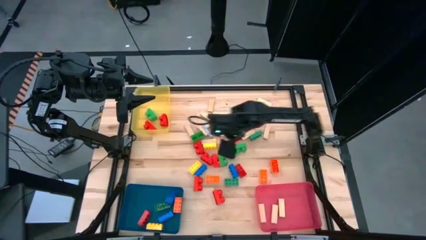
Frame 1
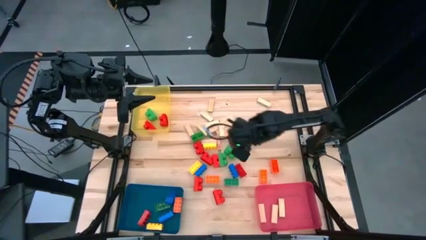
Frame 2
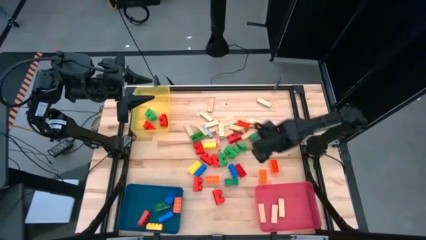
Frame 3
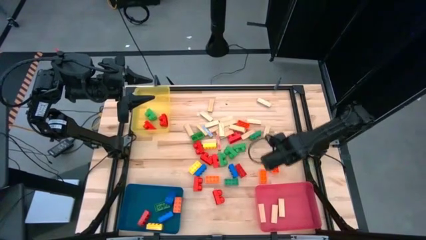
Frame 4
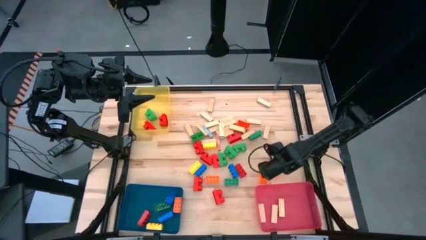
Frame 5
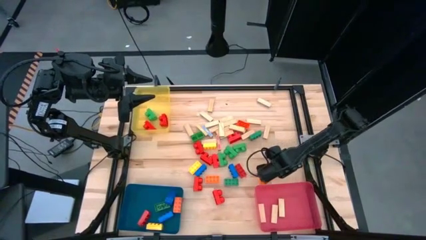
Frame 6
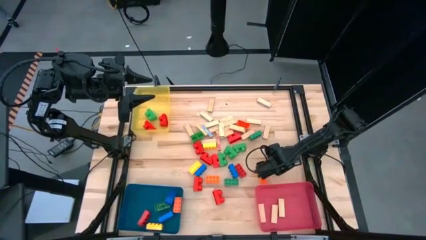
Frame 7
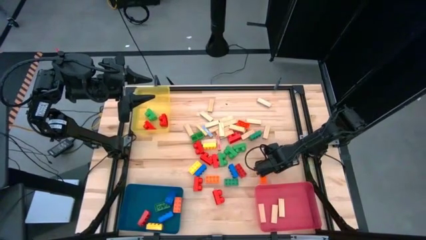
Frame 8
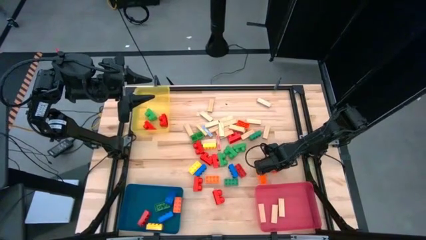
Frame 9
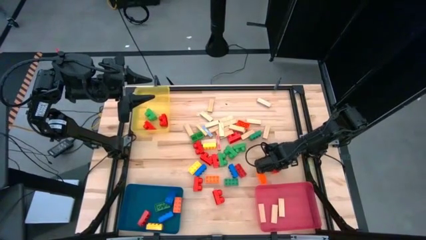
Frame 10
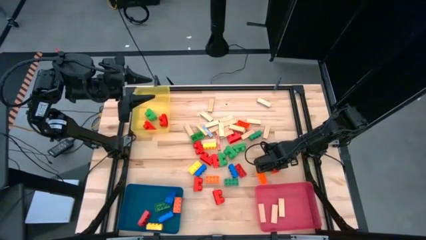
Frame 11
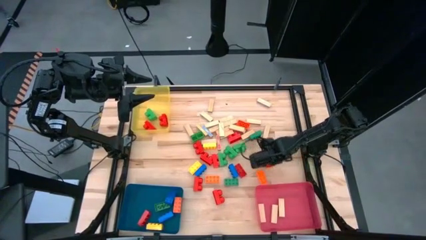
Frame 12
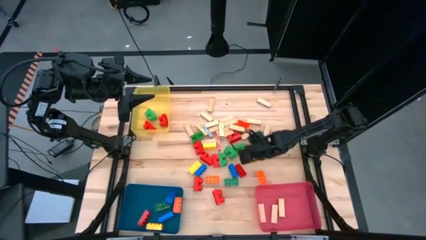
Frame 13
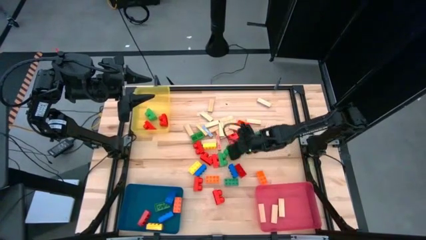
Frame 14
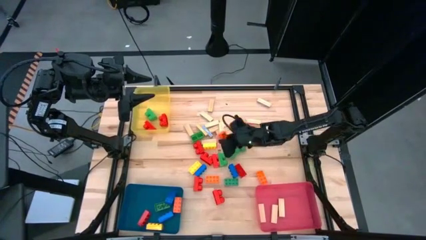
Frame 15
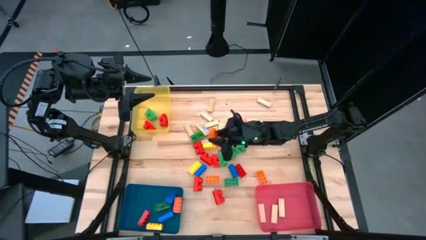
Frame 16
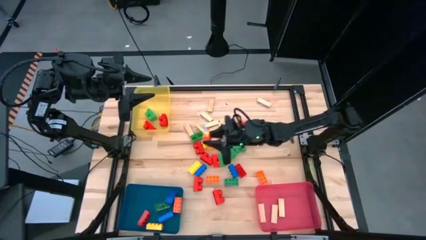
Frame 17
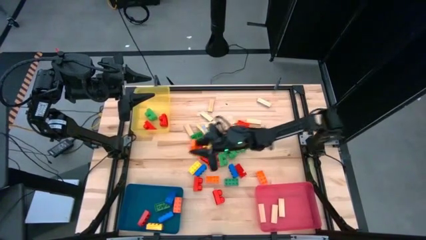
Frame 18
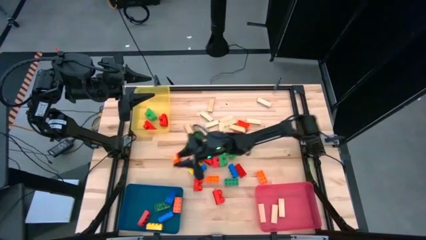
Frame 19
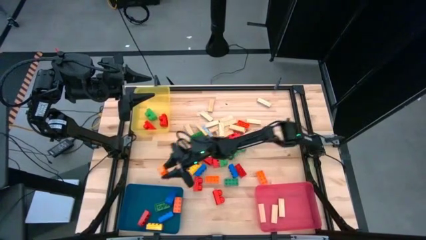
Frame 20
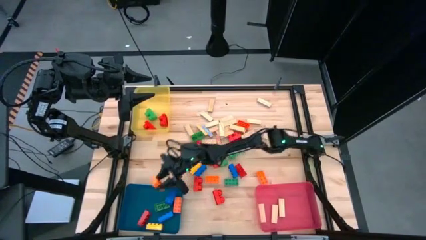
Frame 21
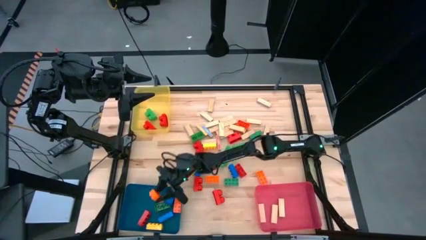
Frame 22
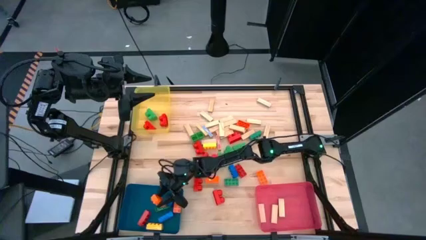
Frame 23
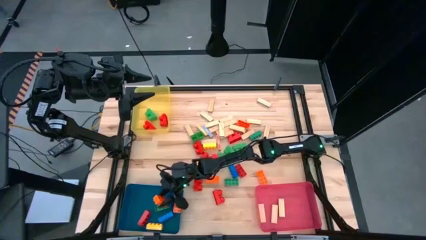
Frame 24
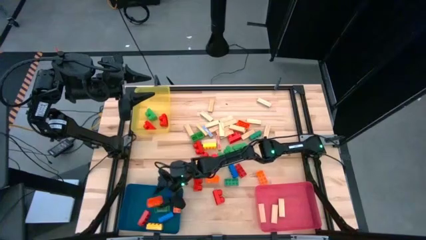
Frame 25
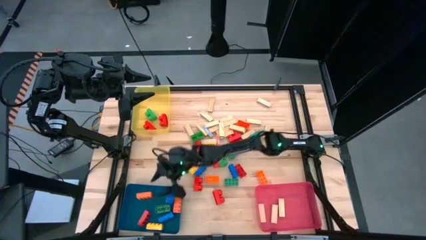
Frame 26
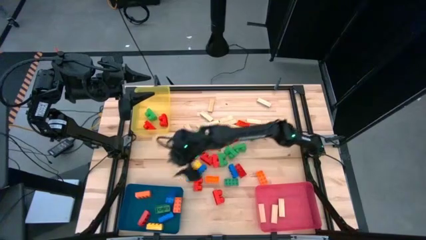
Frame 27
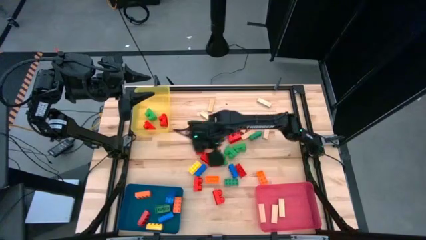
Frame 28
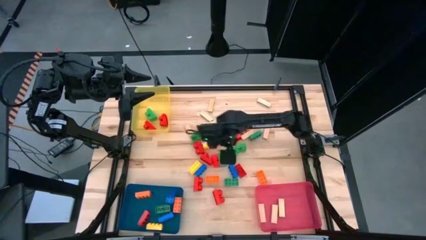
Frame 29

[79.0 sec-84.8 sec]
Task: Sort blocks by size
Put the orange game piece into the blue bin

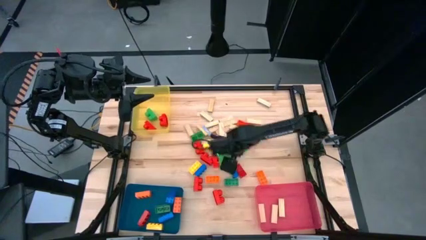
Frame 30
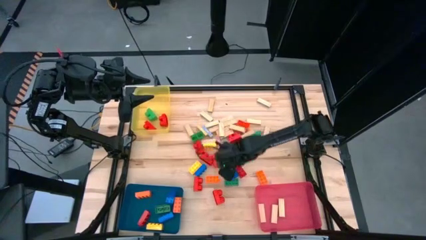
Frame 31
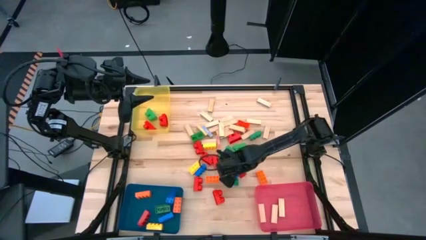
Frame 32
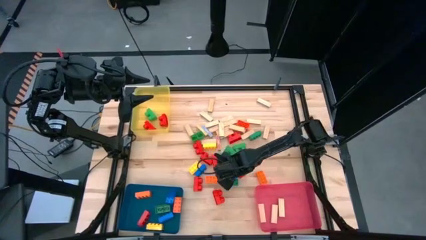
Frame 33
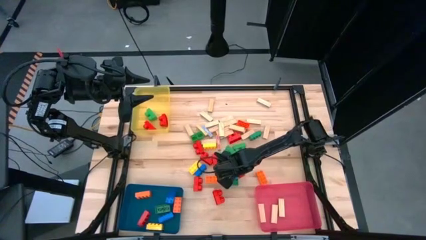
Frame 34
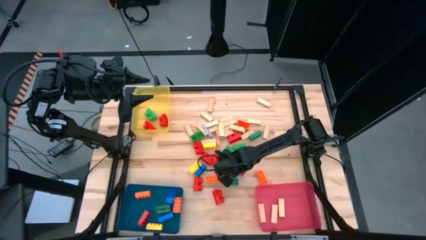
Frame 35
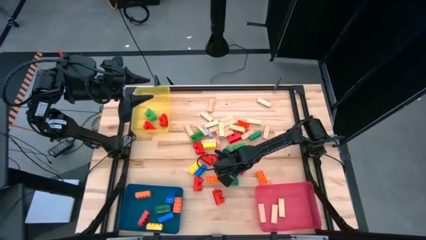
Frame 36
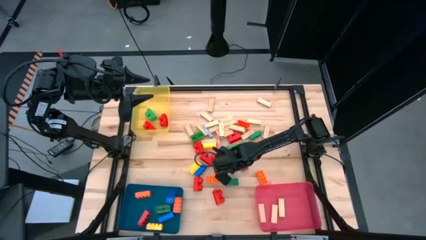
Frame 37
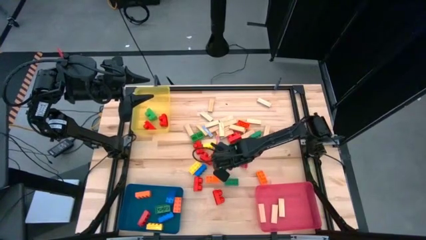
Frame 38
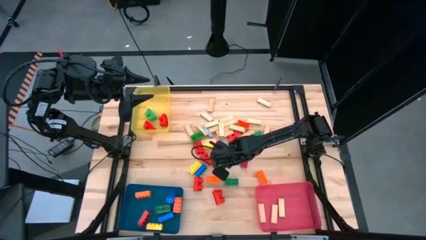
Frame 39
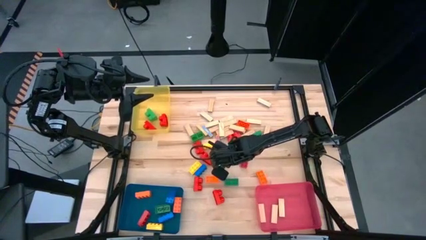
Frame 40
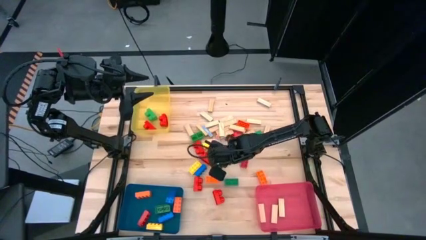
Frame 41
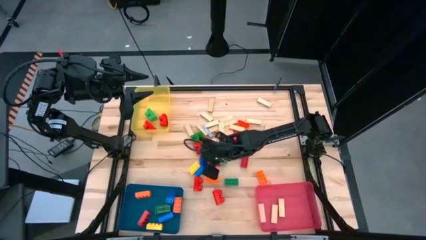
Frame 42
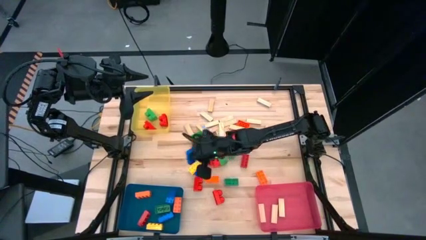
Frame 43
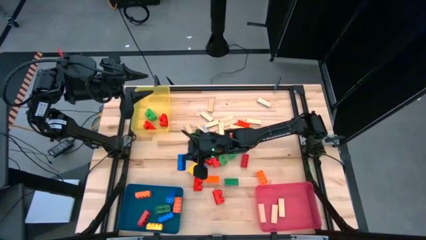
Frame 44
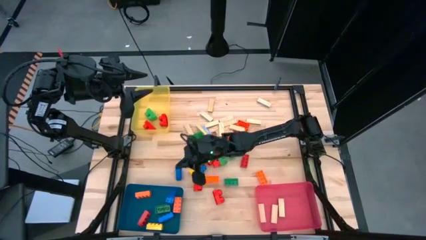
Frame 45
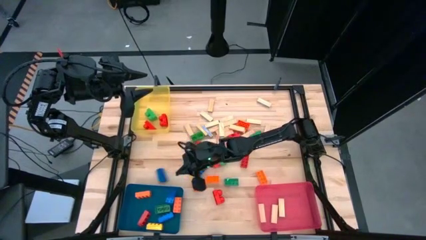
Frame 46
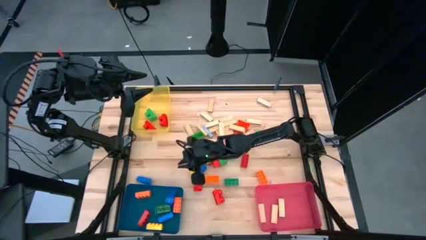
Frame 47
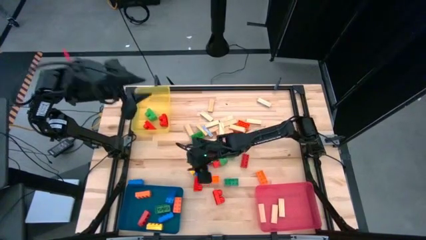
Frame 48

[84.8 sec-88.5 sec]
Put the blue game piece into the blue bin

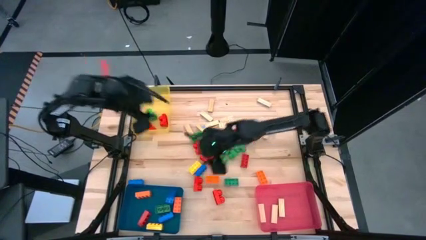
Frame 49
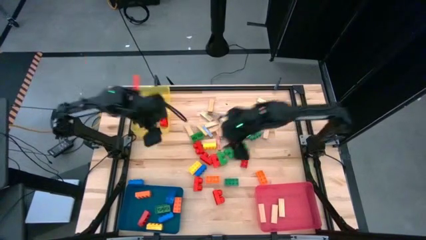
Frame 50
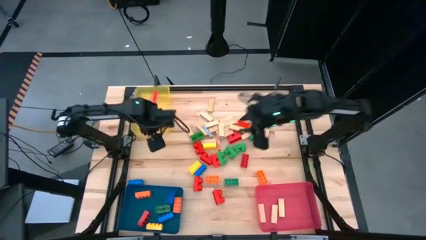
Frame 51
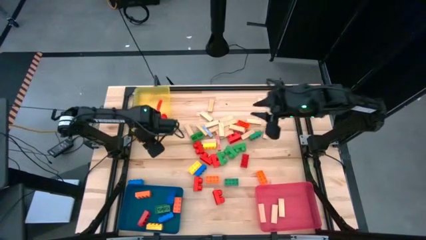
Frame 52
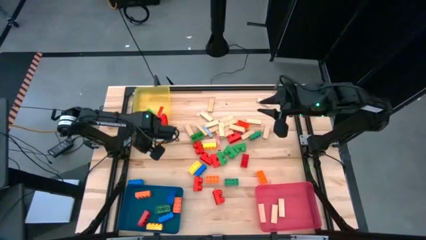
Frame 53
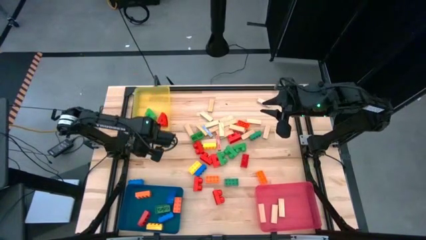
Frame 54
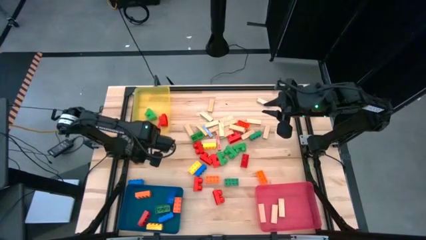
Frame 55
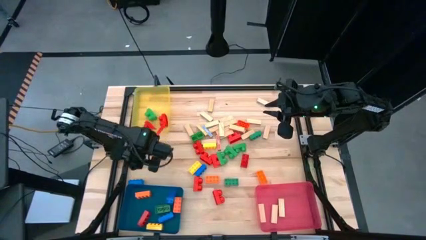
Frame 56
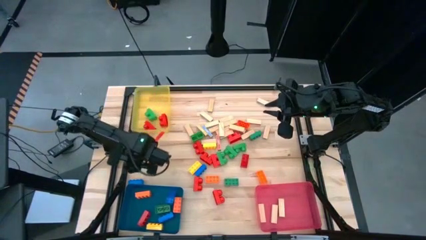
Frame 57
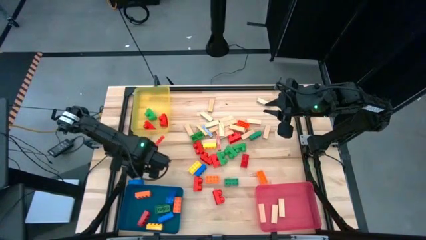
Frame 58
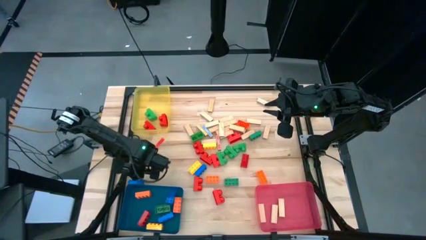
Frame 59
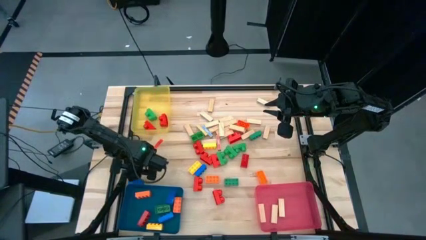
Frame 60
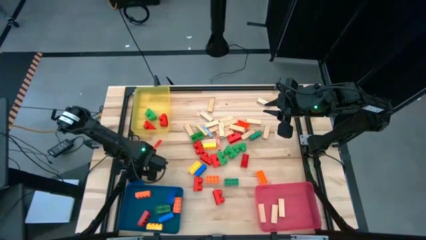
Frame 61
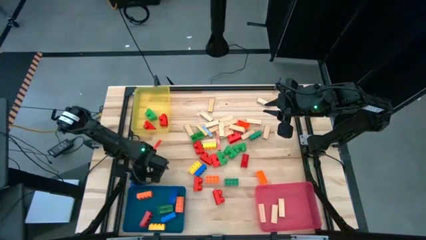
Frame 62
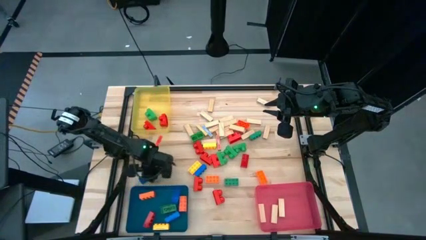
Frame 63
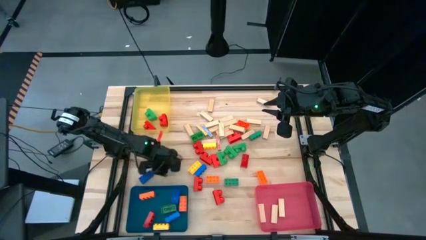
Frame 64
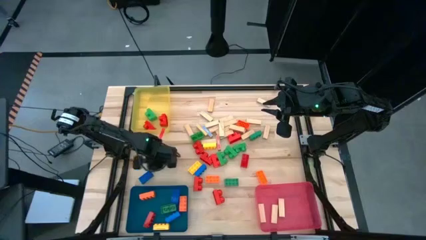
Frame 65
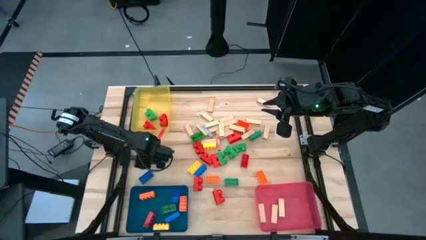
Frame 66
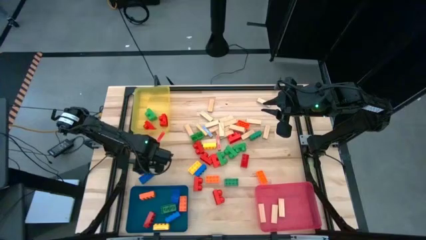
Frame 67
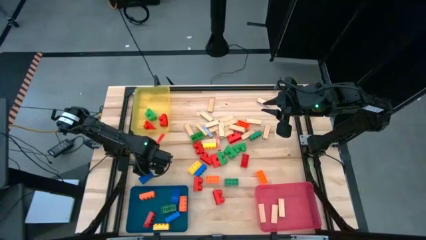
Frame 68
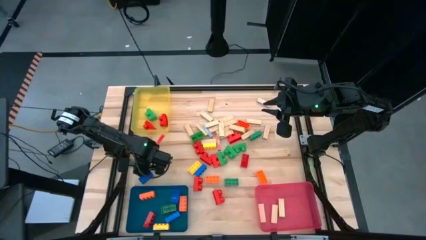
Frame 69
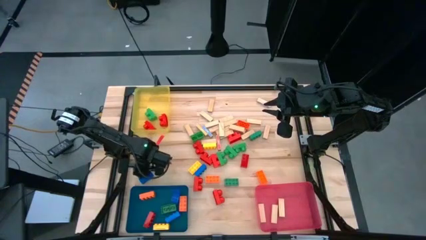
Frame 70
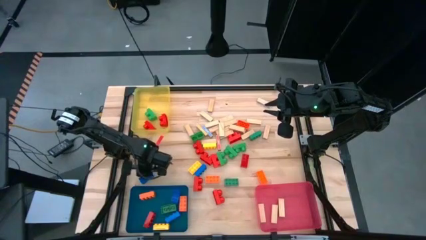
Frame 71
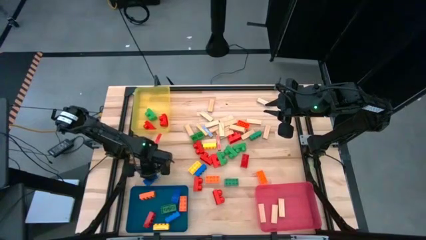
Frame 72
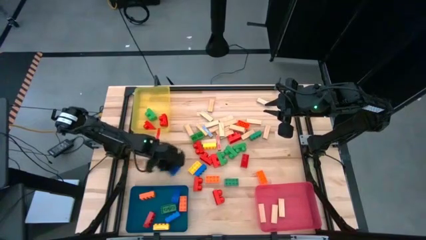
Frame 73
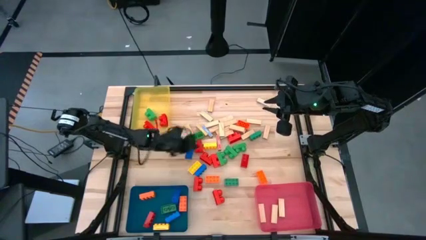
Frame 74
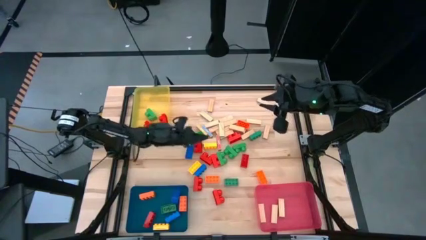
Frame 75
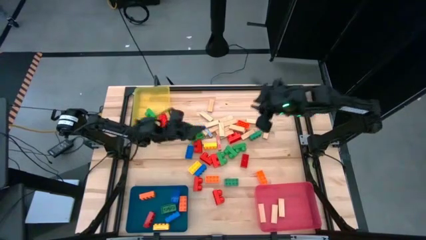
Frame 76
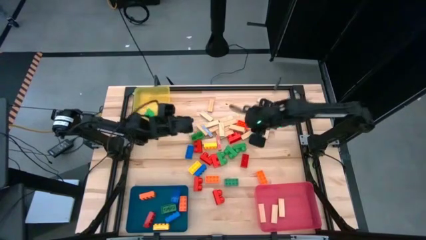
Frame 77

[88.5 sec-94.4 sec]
Move blue game piece to the center
